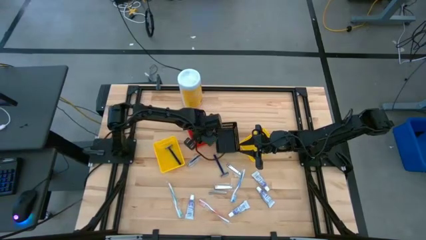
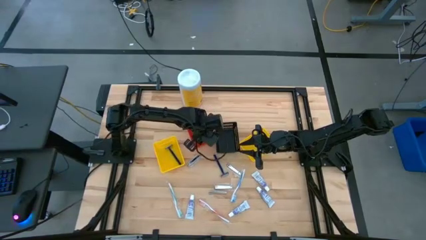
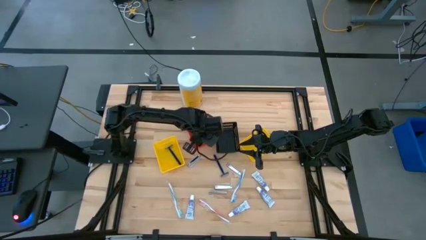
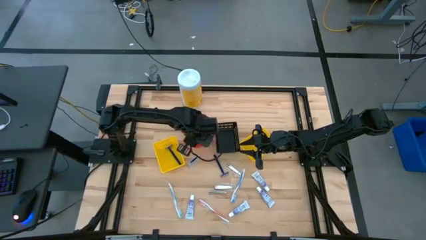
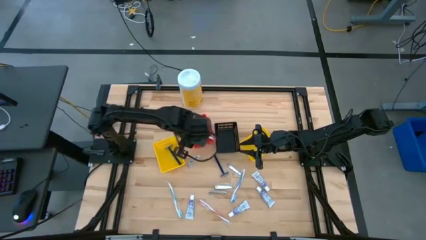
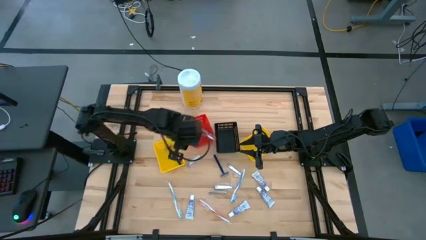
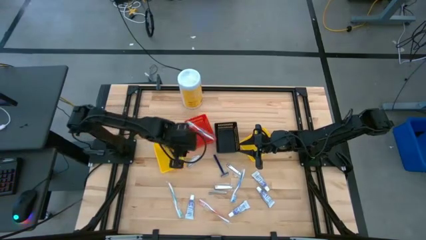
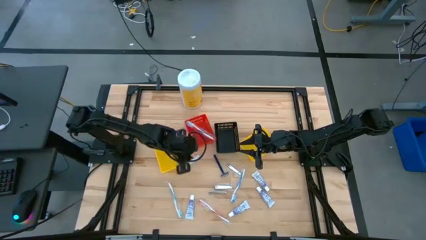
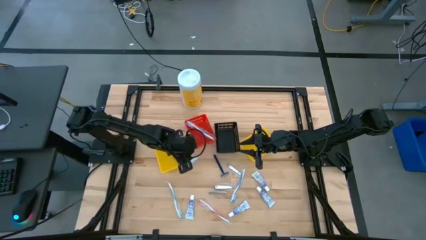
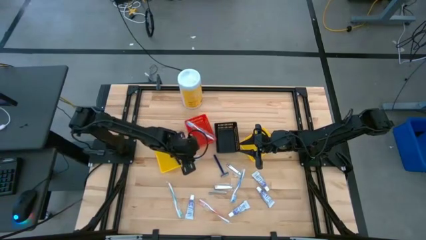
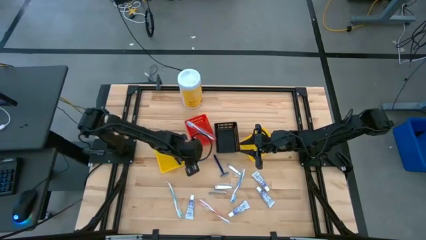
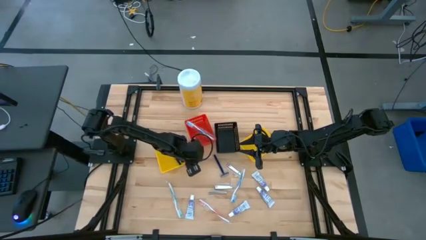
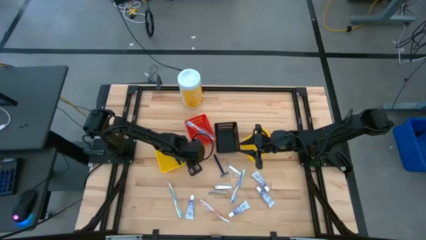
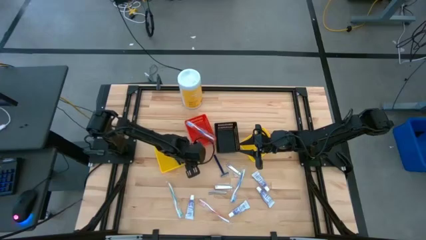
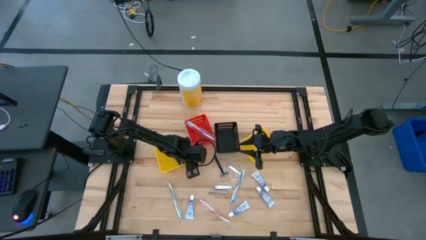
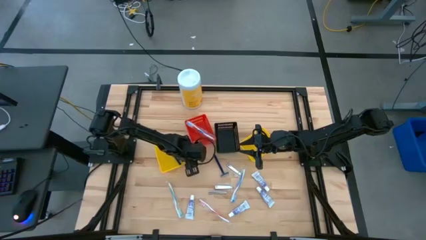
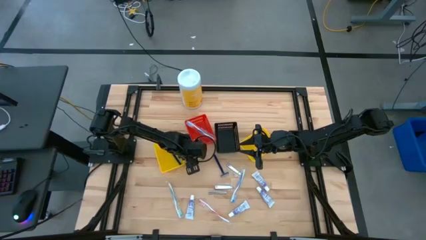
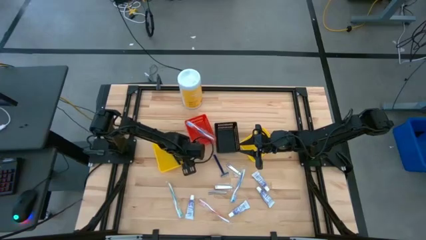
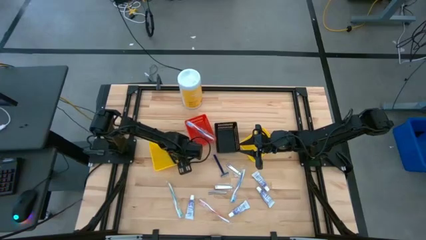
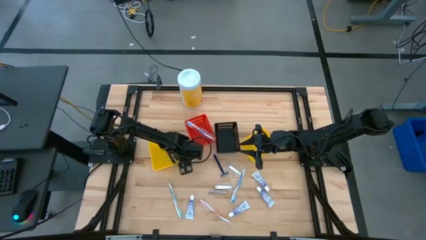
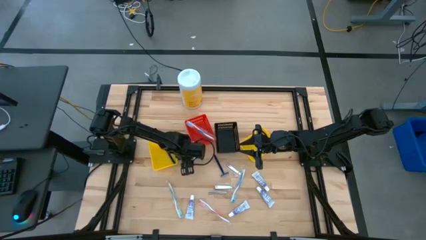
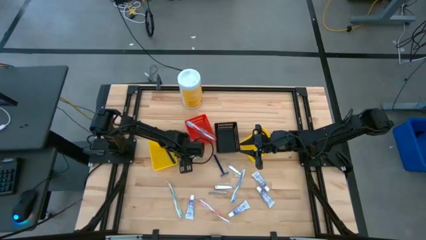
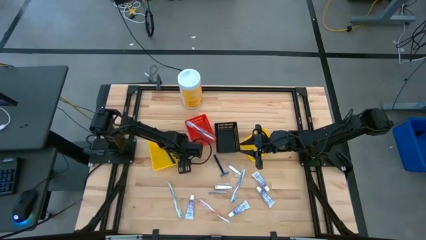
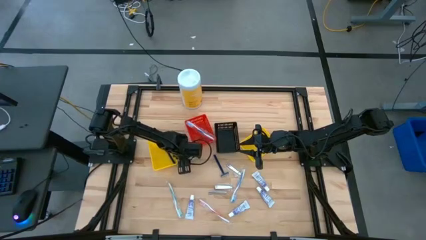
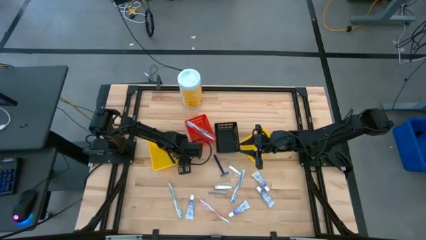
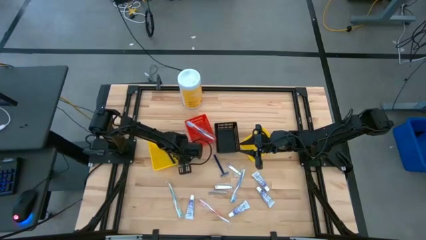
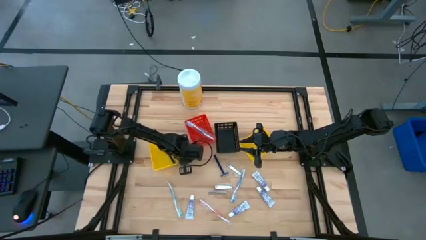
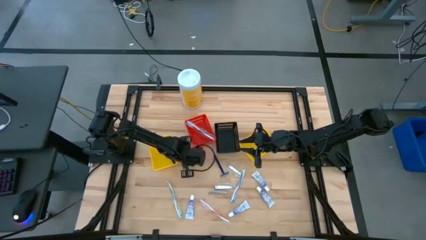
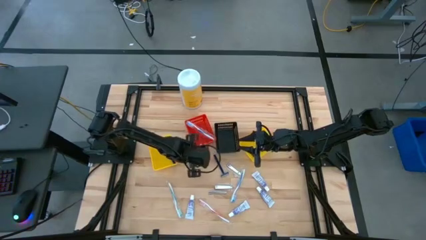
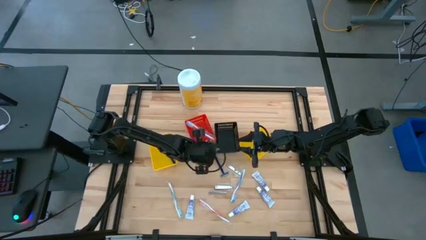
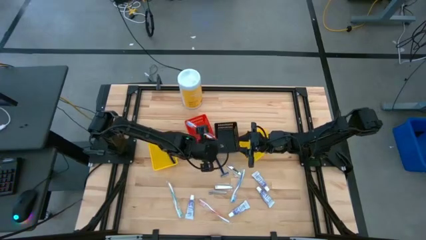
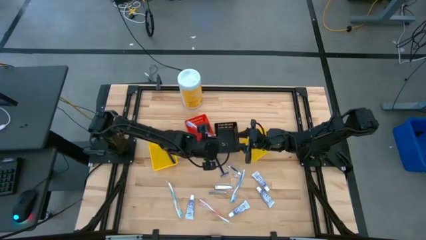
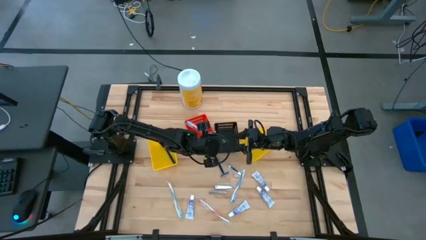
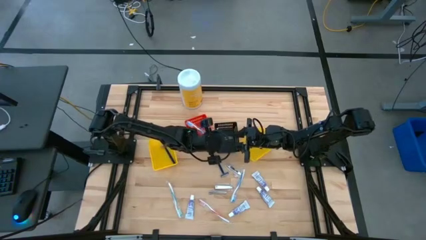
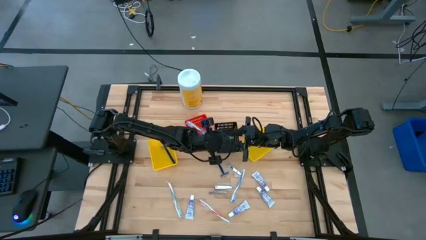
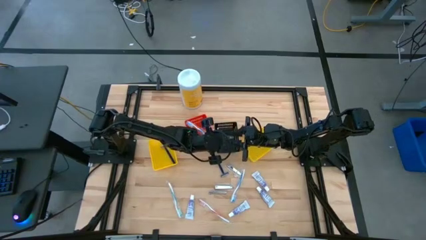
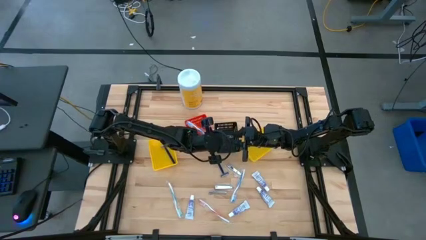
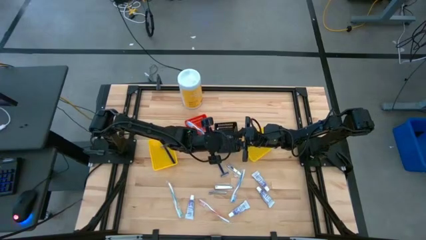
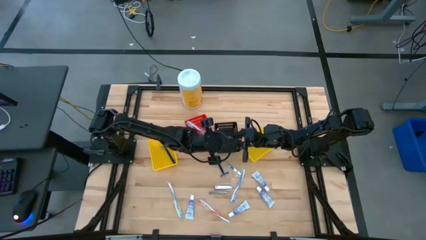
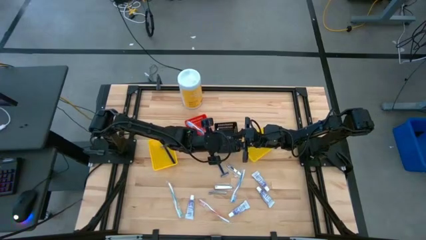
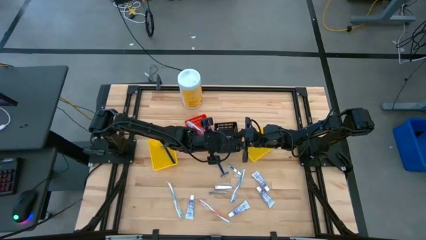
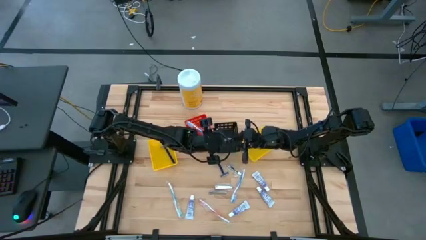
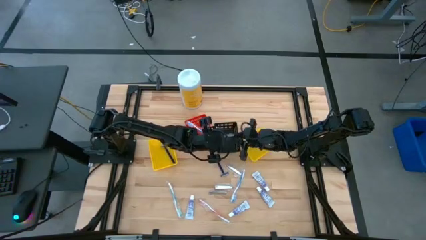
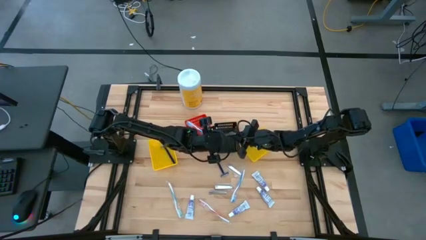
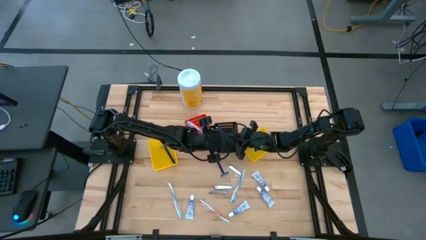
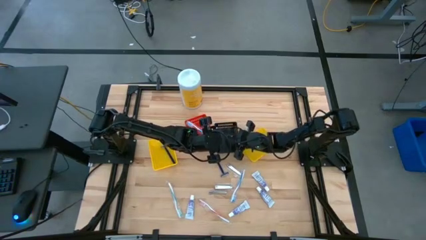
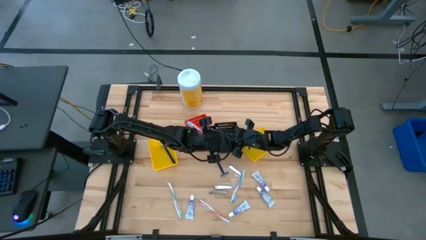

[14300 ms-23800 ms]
Task: Pick & Place Travel size toiletries
Put the silver nail cutter into the black bin

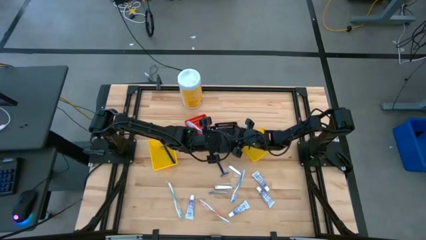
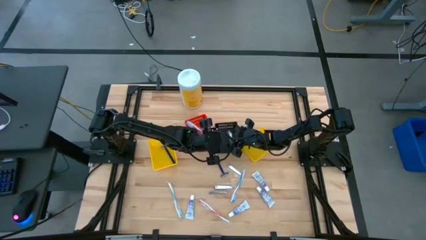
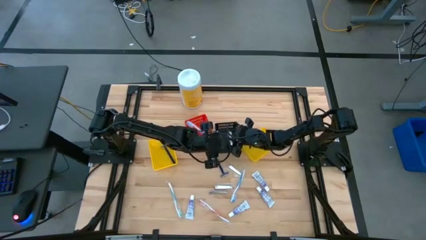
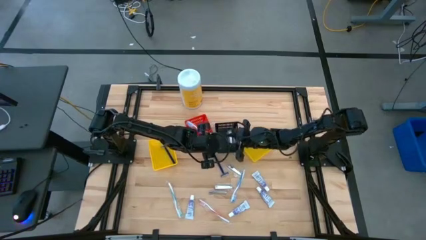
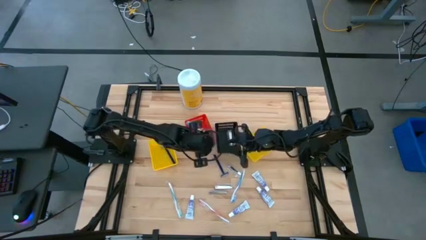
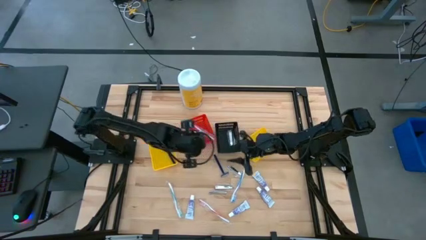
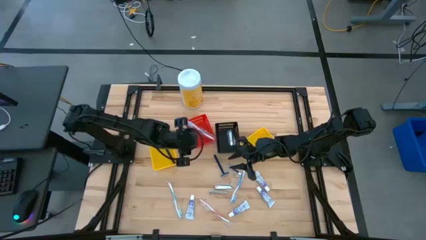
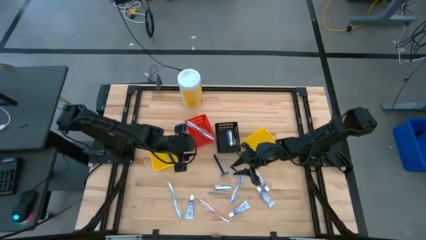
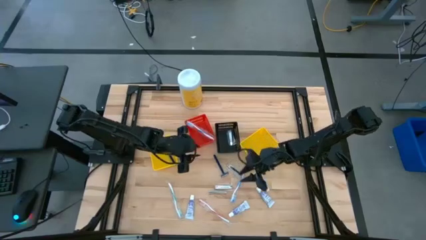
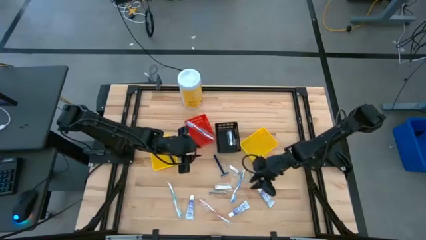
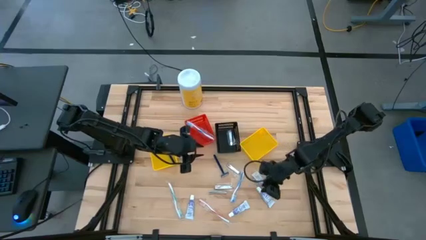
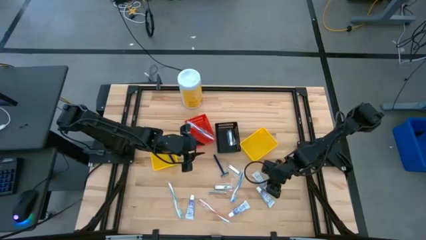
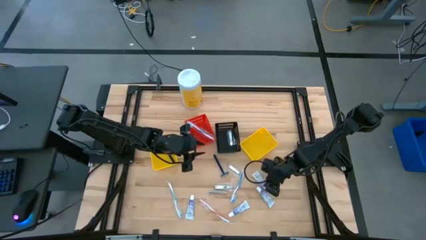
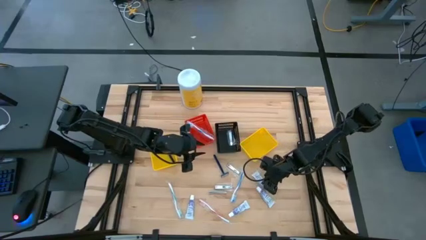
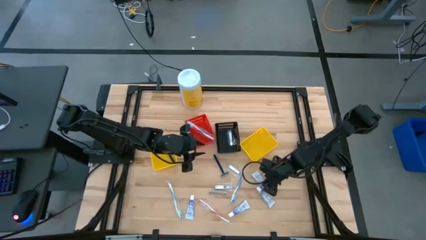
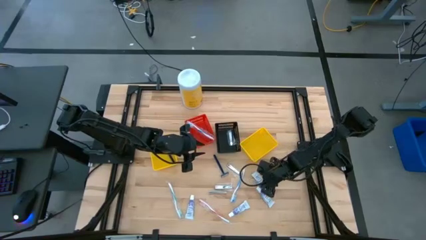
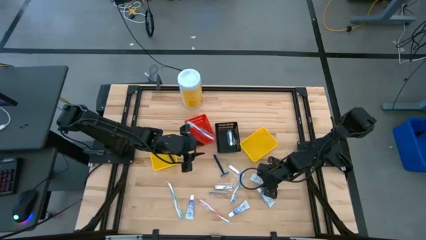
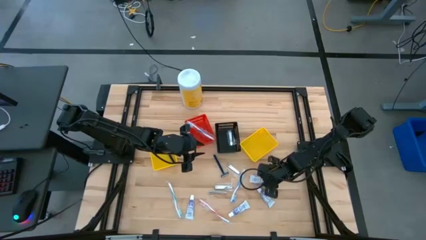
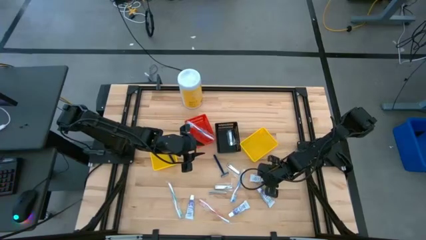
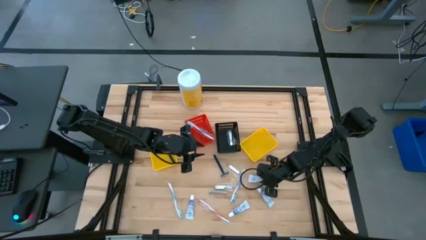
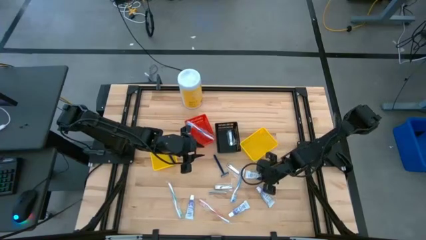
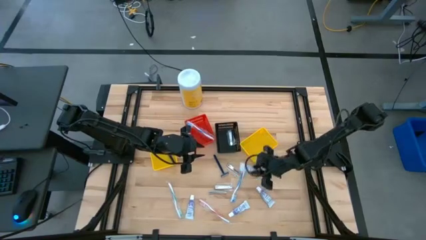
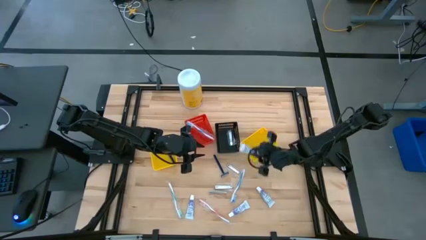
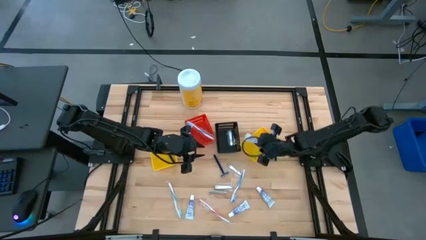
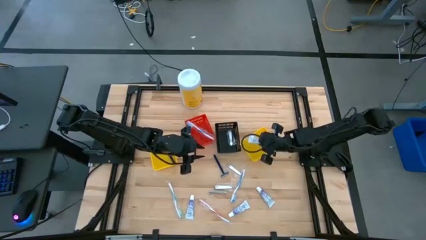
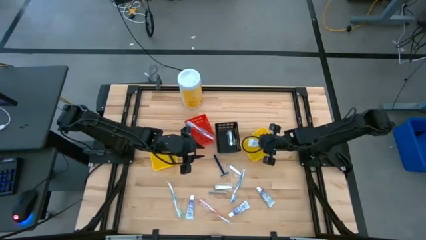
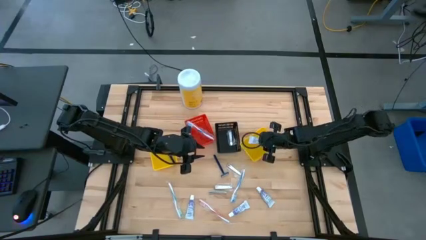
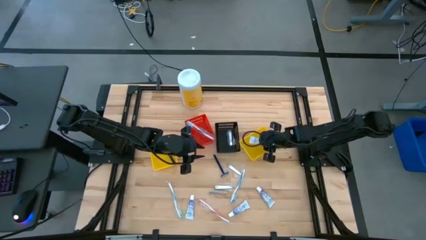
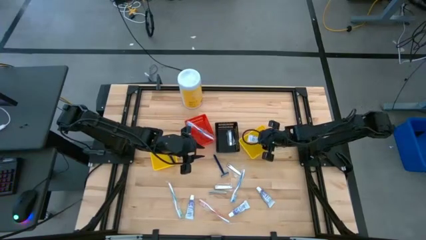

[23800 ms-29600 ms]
Put the white toothpaste into the right yellow bin

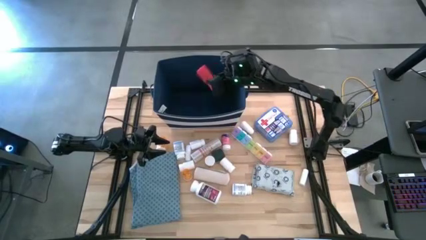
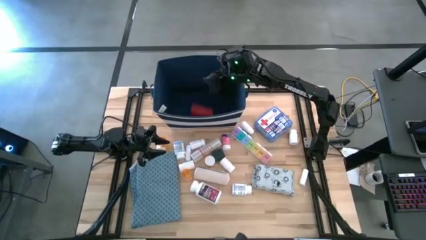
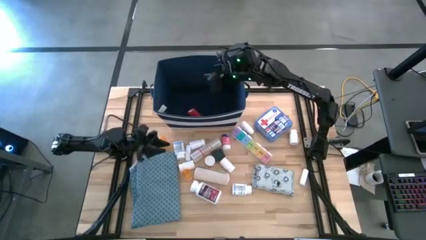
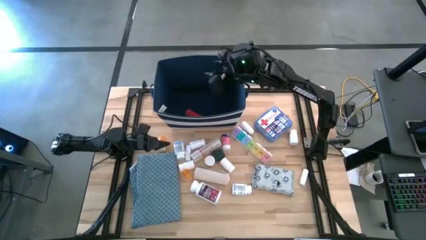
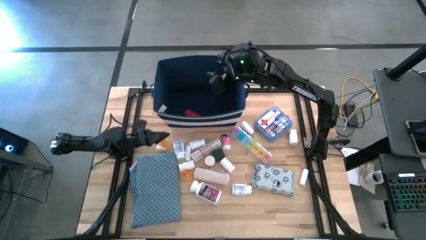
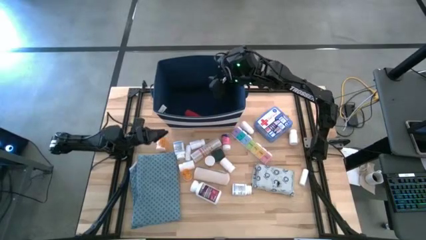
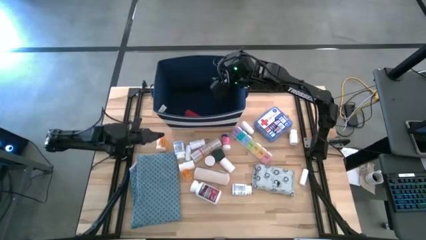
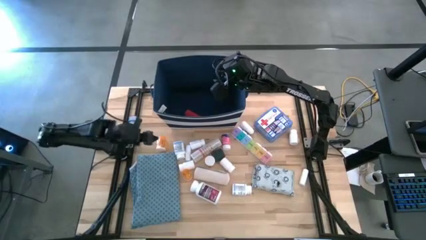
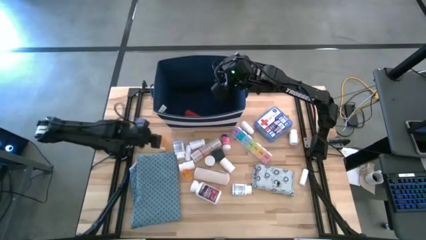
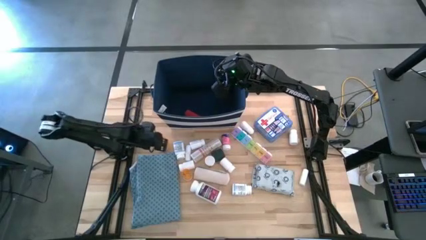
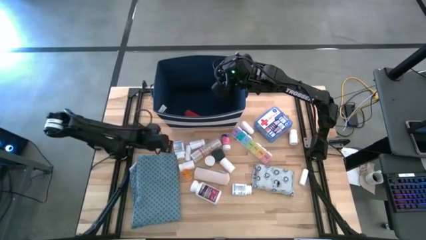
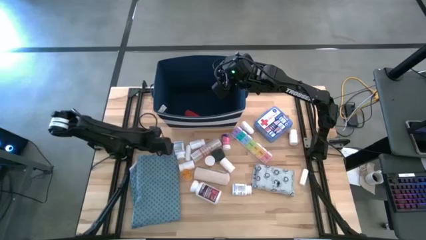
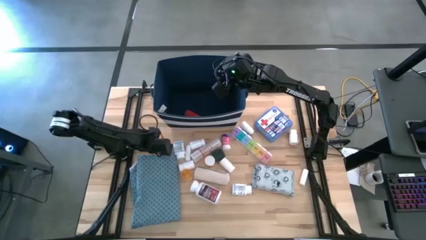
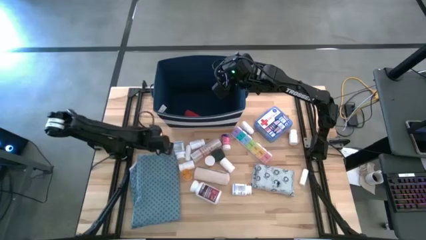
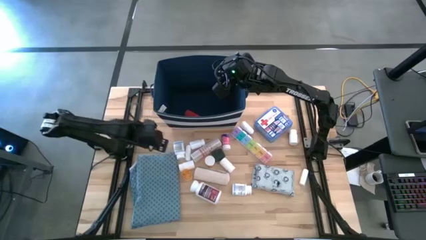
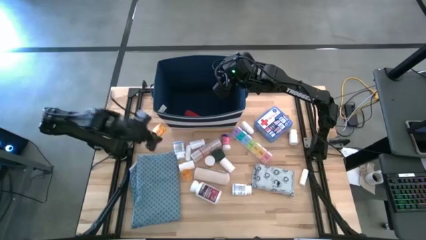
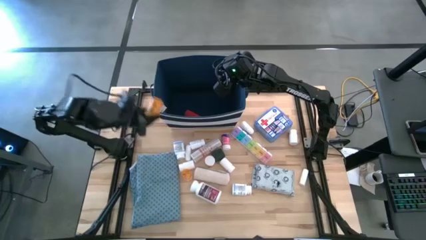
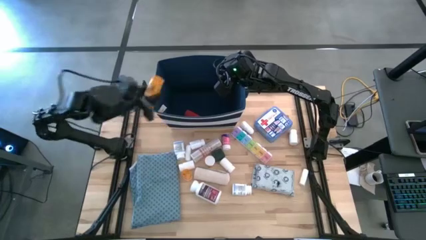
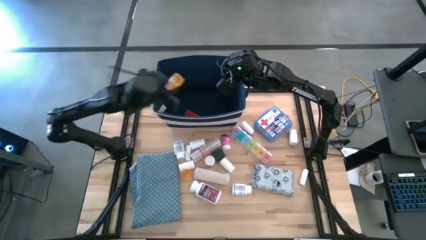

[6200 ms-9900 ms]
Task: Pick & place medical supplies in basket/bin
Put the orange pill bottle into the blue bin
